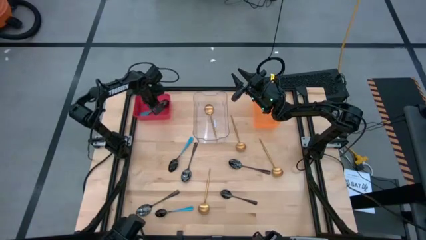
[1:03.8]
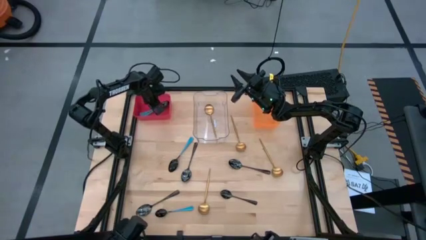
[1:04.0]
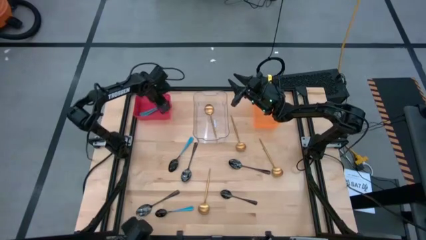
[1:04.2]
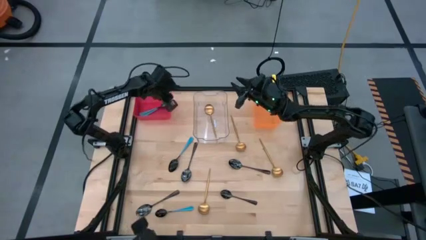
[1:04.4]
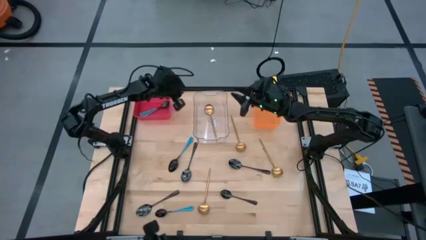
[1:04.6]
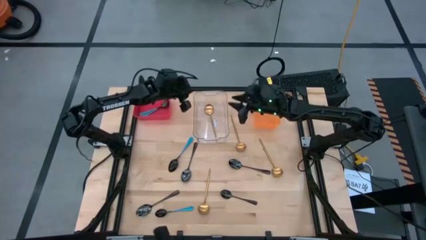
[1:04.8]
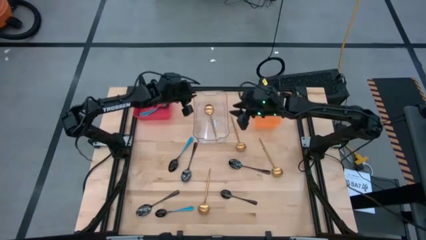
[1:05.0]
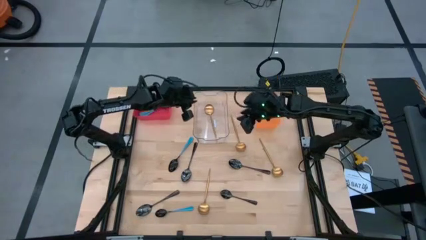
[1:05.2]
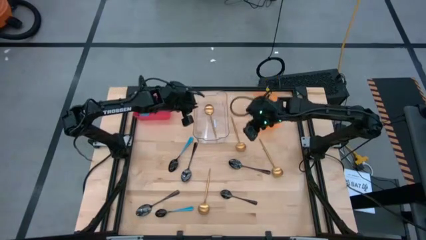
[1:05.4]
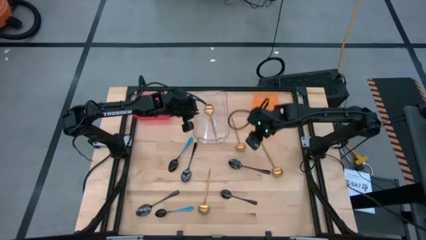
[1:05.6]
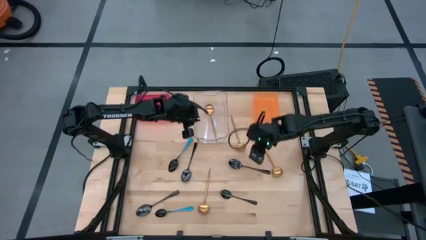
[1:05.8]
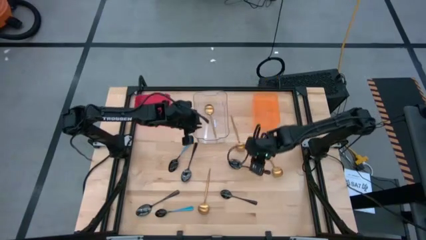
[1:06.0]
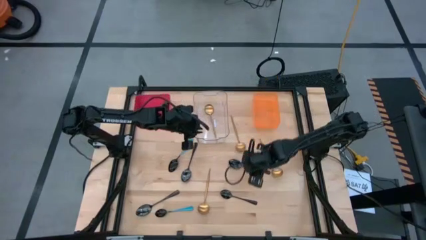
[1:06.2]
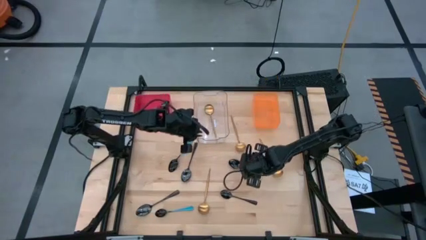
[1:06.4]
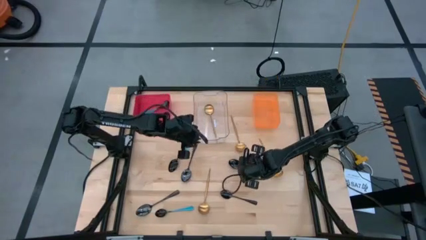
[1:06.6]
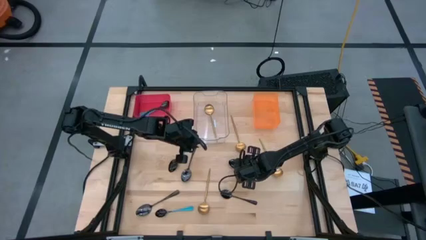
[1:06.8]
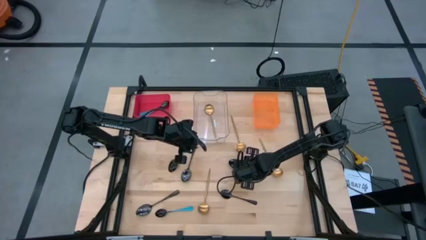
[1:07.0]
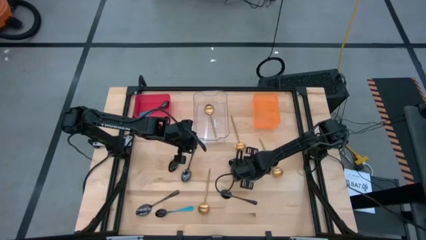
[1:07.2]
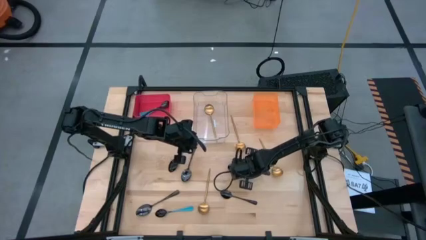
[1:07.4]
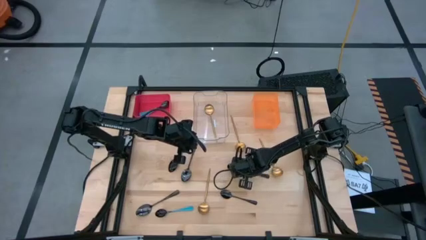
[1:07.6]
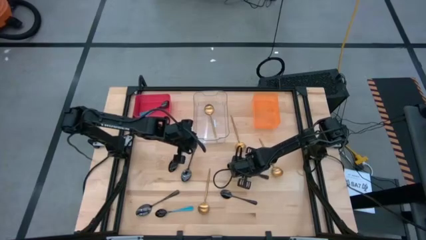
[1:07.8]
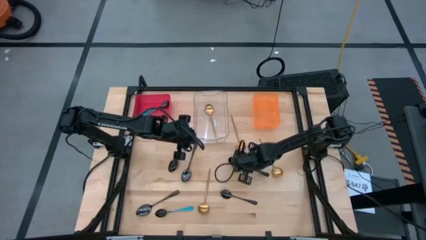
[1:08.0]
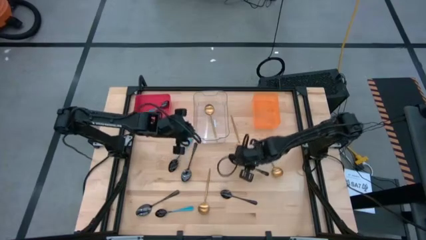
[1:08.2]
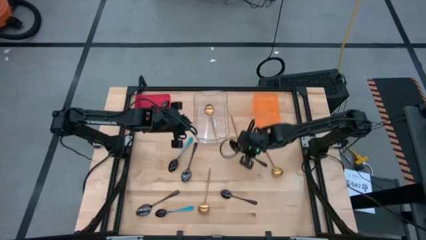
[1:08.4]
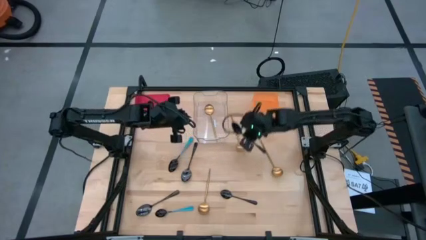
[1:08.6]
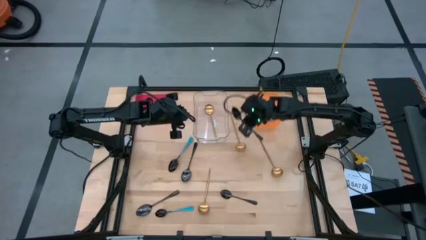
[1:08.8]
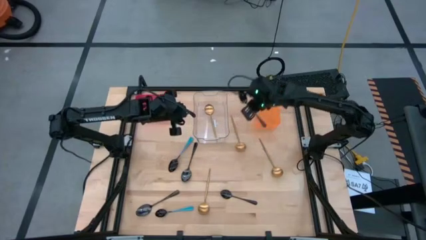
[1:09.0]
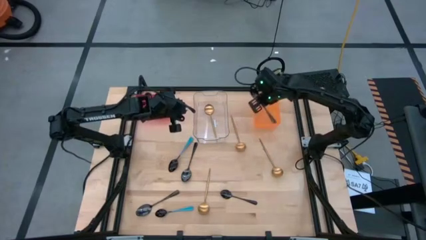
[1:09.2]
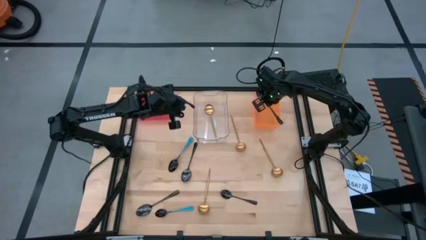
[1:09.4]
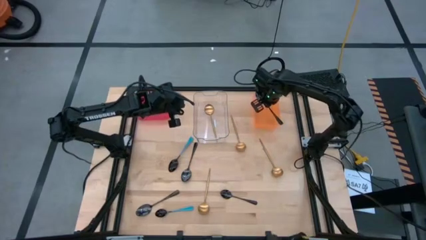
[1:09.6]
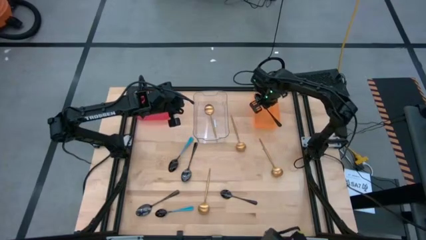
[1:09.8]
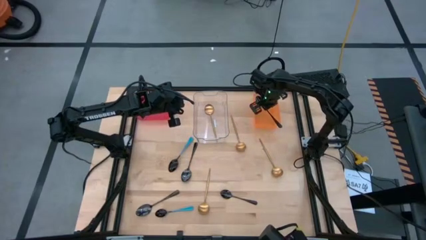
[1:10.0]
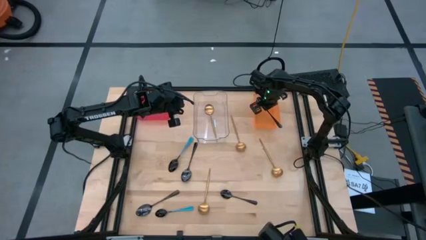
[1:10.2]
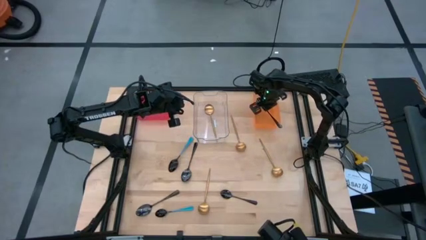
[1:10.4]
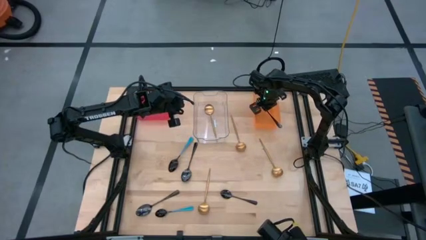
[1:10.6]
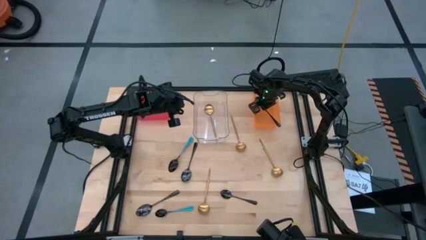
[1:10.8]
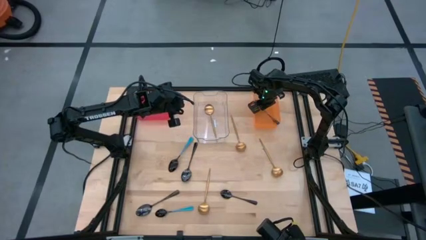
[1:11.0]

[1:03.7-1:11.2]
Task: Sort silverware by color (type)
Put the black spoon into the orange bin

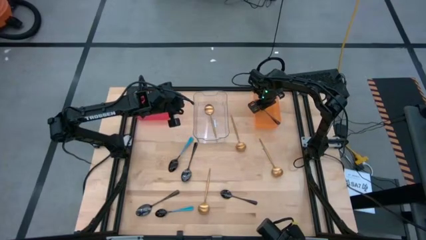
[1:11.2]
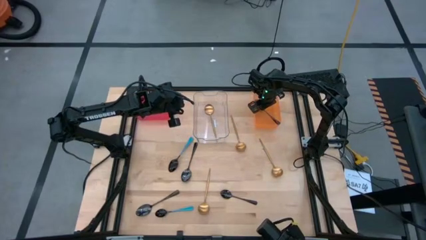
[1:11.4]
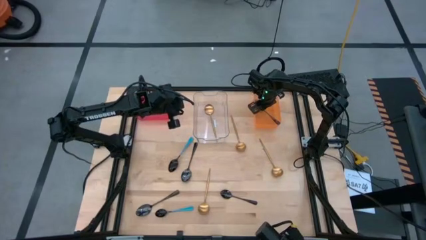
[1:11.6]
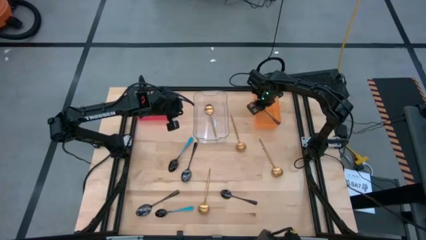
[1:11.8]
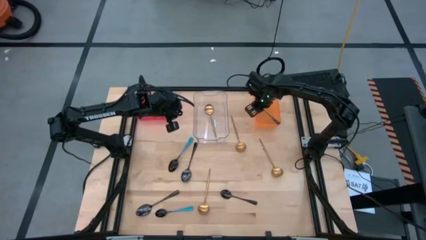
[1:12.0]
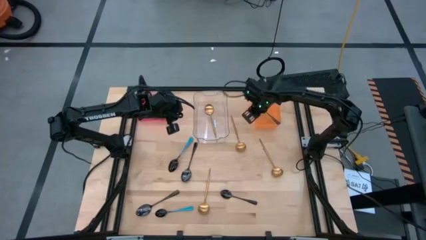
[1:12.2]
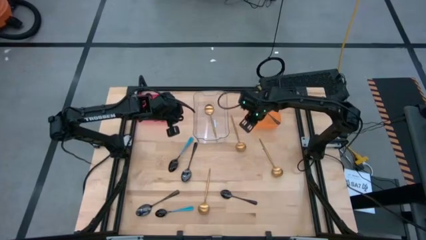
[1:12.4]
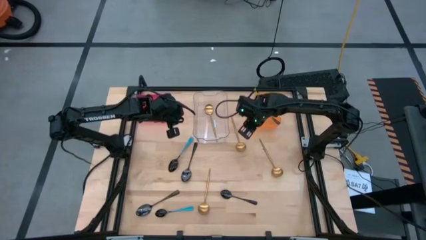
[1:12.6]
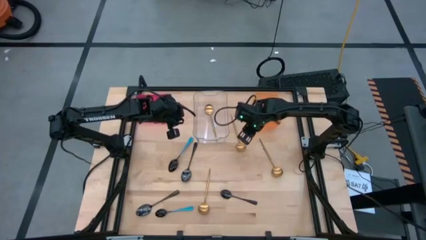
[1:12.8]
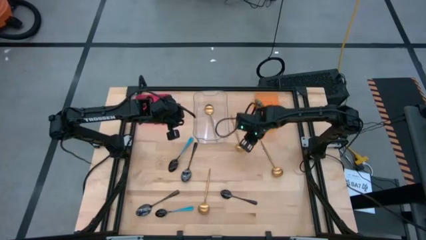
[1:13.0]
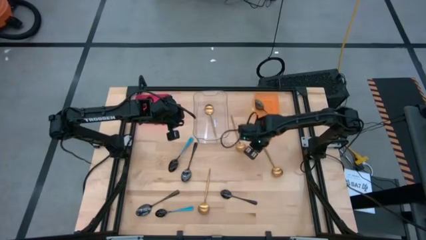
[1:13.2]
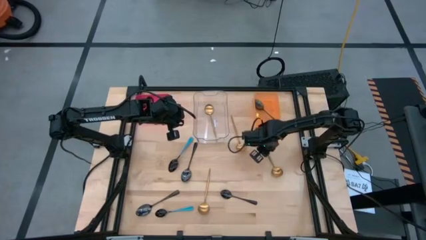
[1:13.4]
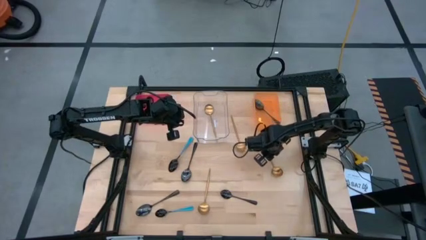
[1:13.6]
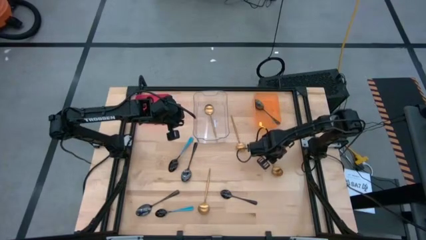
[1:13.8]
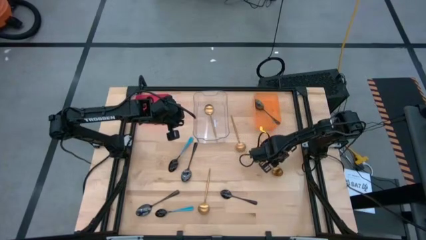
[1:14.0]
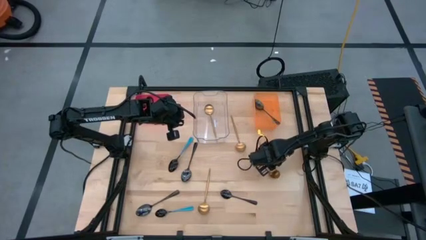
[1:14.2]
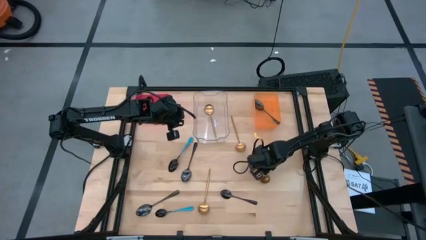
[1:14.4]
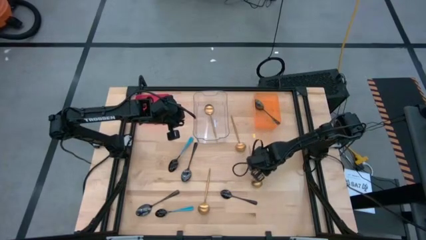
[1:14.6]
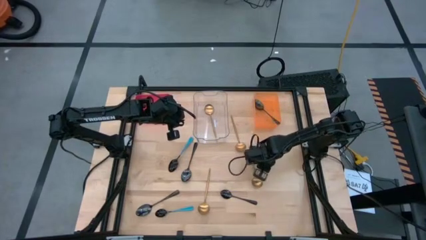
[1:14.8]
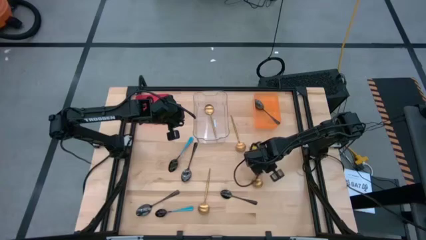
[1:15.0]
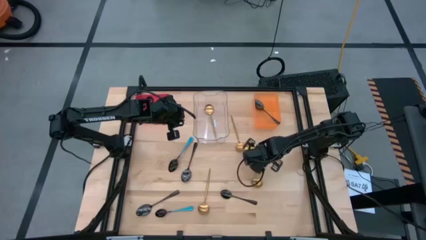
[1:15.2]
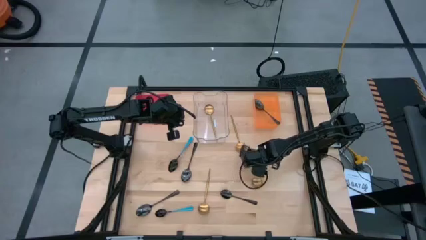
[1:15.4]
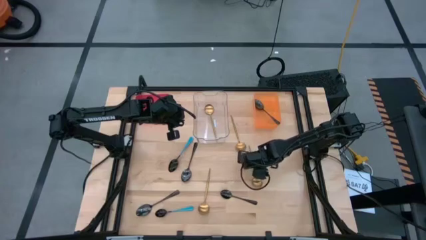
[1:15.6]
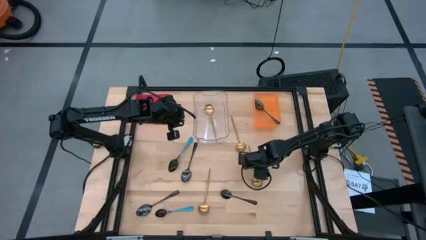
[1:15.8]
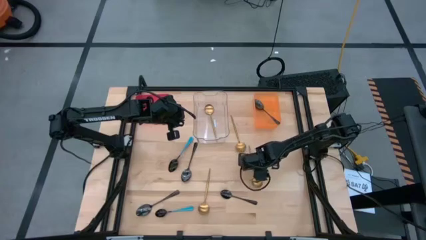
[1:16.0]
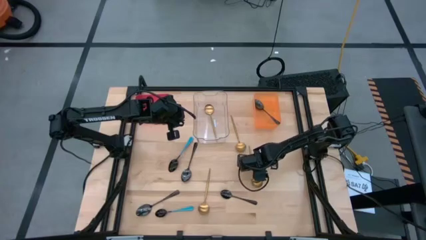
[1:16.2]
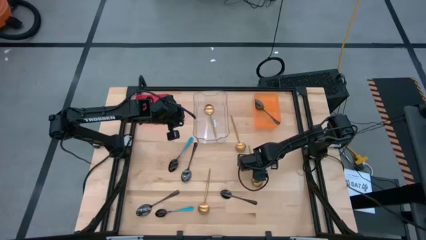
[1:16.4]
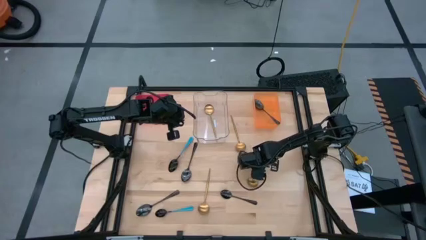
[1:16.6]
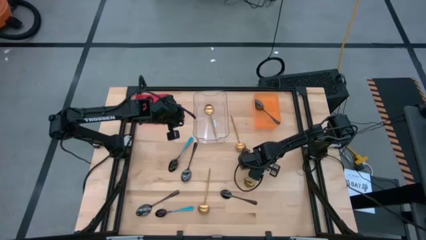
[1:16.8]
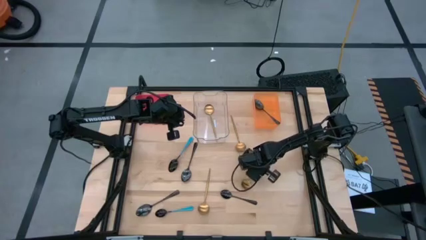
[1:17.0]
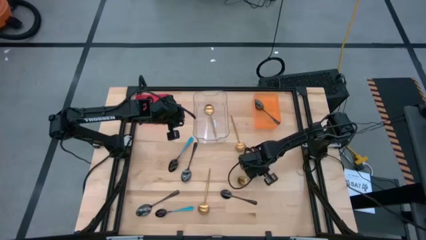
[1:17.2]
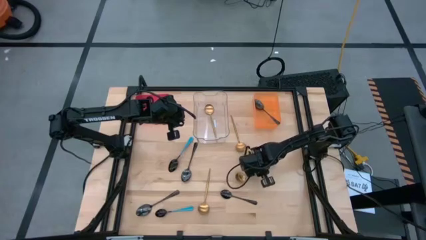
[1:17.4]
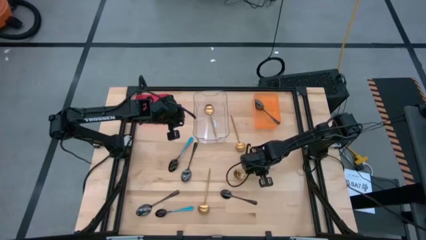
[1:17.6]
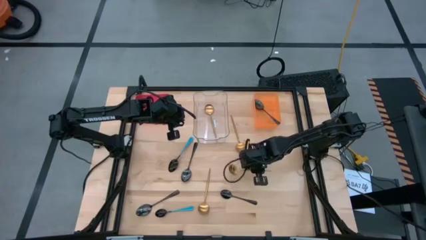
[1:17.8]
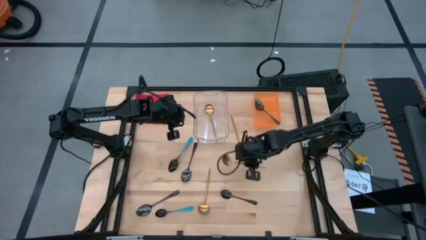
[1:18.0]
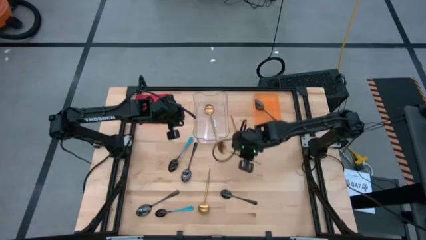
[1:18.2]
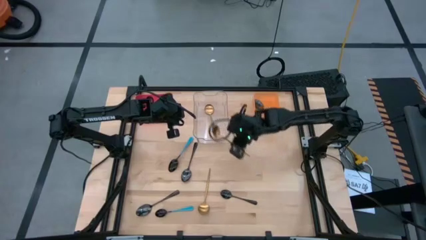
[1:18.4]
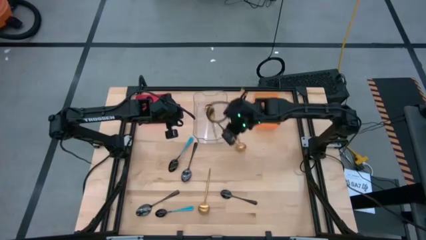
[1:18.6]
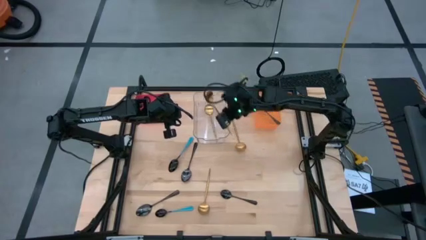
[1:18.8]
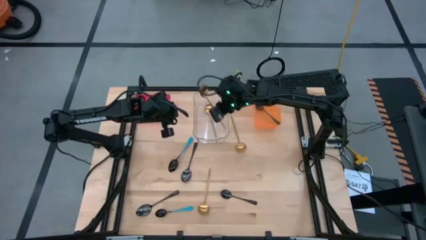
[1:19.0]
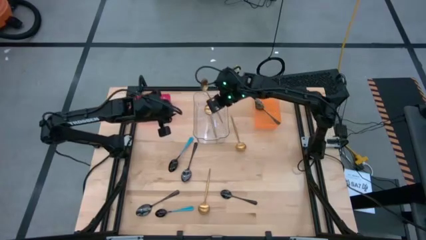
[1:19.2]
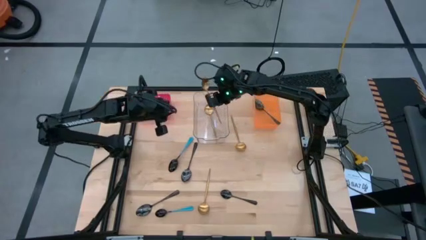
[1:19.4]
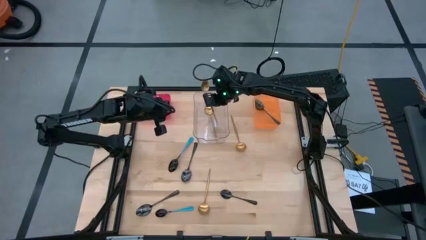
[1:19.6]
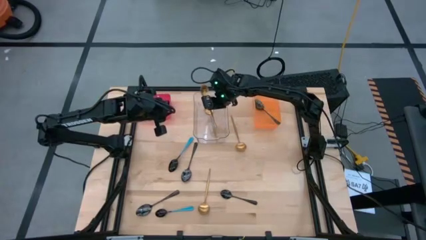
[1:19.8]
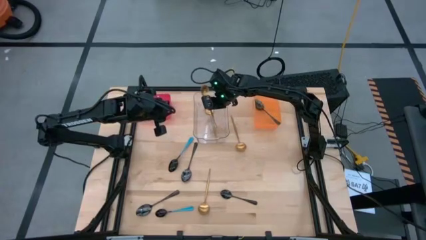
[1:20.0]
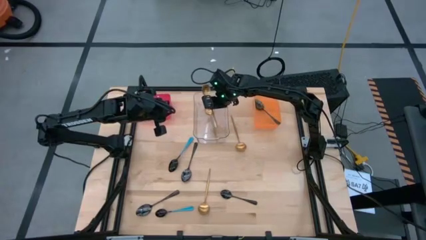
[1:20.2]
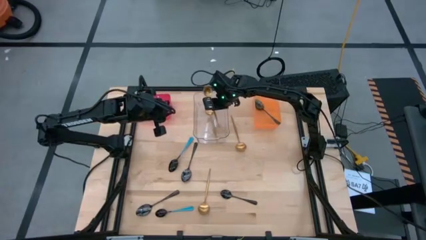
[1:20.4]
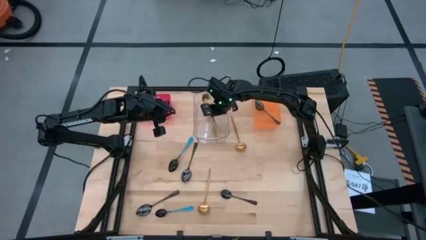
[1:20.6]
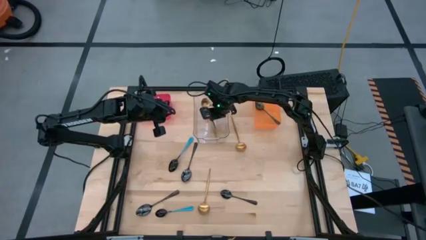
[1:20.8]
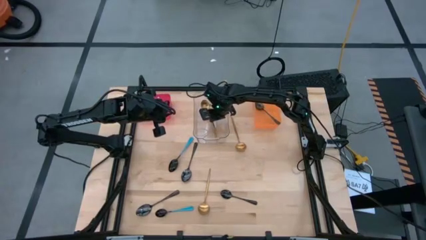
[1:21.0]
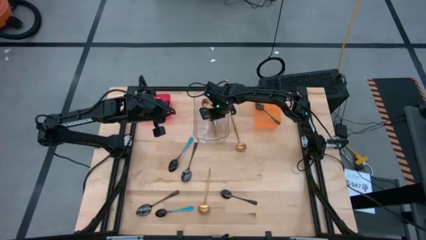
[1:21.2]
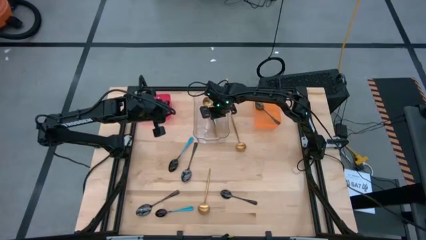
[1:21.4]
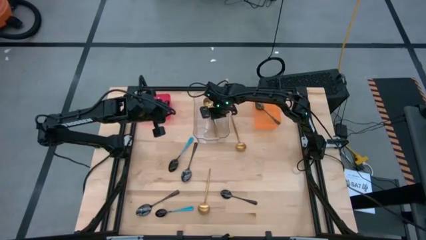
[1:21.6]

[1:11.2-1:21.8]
Put the gold spoon into the transparent bin
